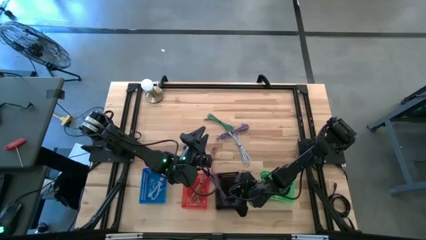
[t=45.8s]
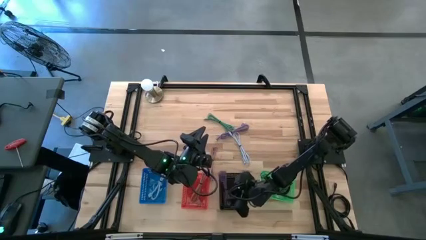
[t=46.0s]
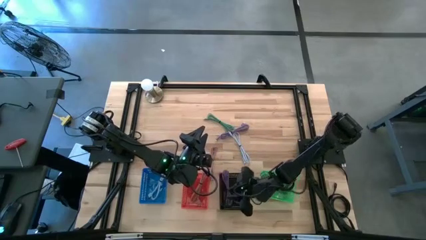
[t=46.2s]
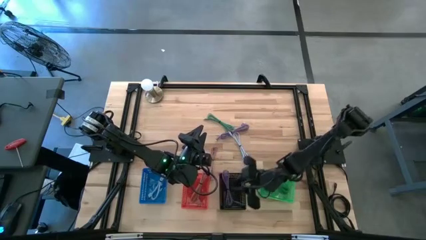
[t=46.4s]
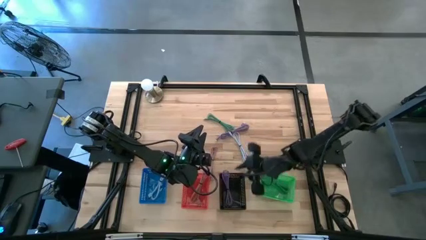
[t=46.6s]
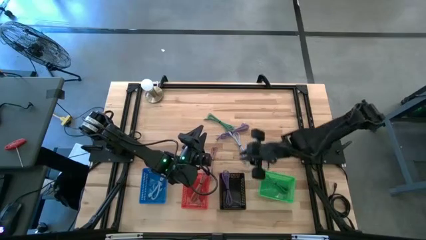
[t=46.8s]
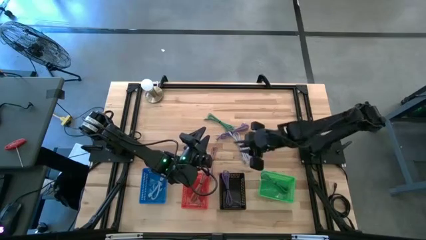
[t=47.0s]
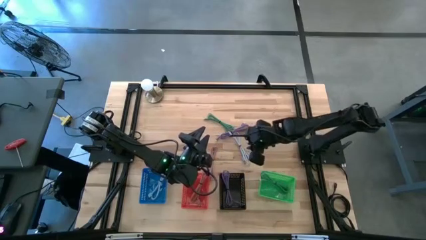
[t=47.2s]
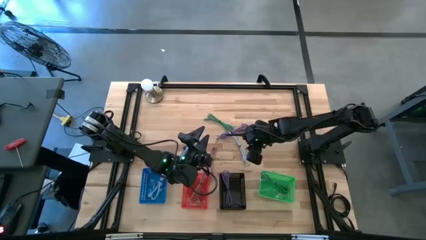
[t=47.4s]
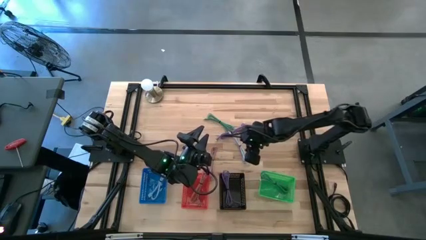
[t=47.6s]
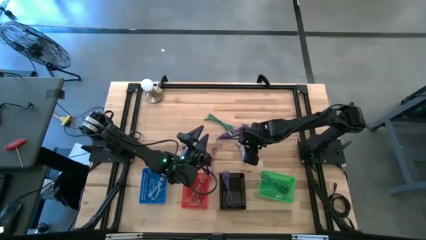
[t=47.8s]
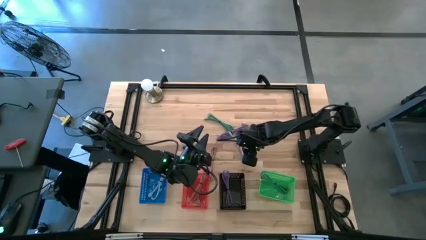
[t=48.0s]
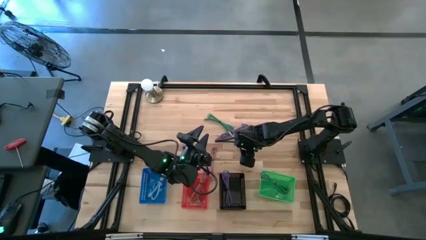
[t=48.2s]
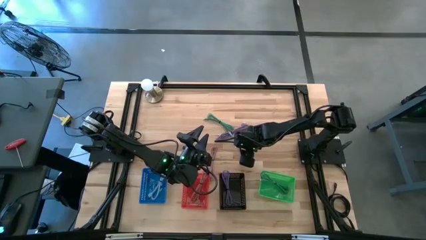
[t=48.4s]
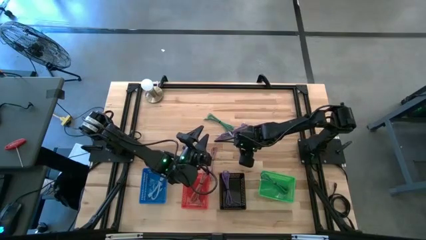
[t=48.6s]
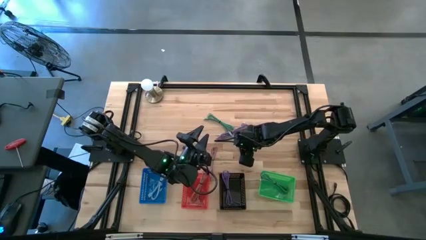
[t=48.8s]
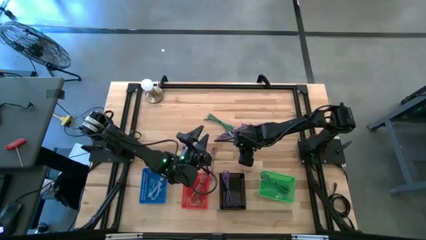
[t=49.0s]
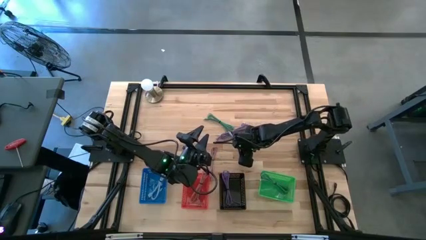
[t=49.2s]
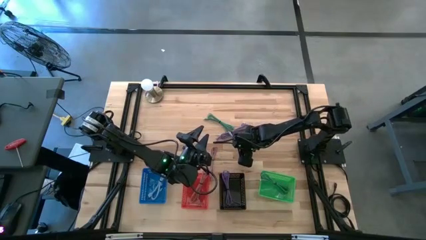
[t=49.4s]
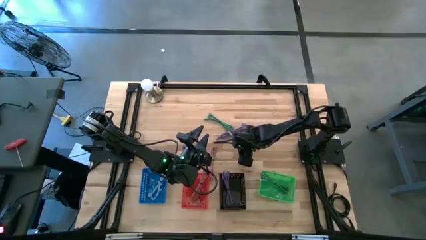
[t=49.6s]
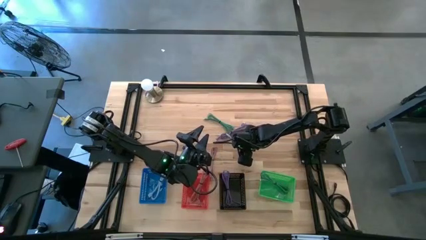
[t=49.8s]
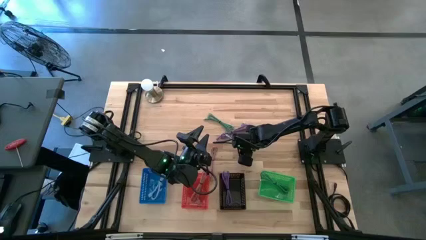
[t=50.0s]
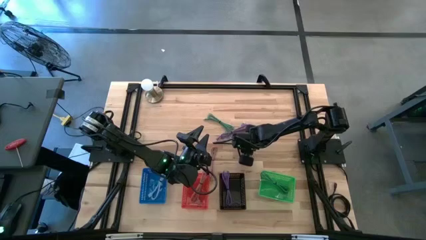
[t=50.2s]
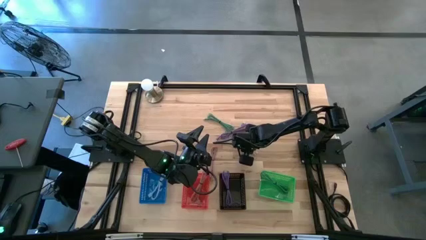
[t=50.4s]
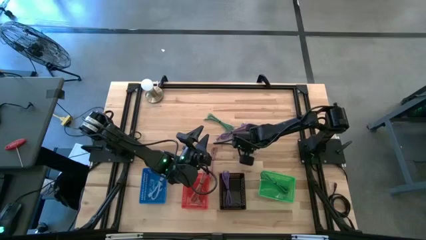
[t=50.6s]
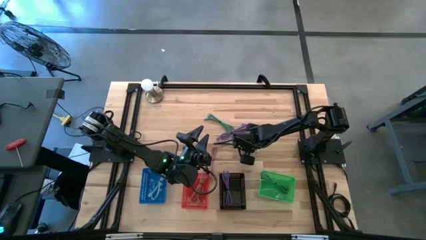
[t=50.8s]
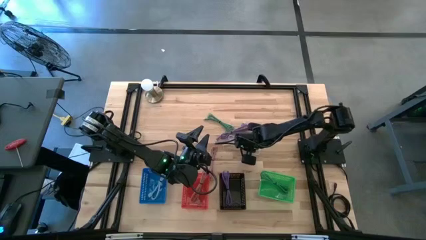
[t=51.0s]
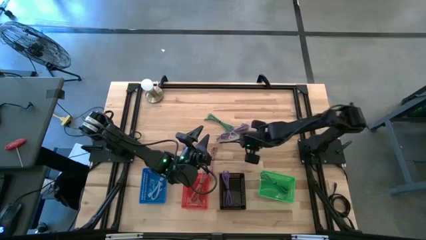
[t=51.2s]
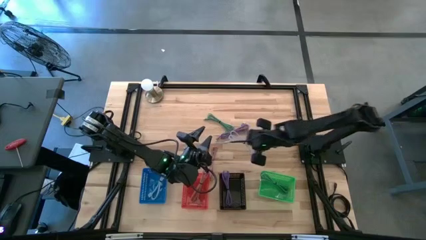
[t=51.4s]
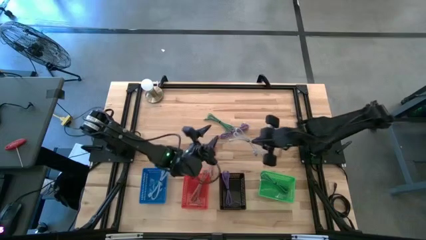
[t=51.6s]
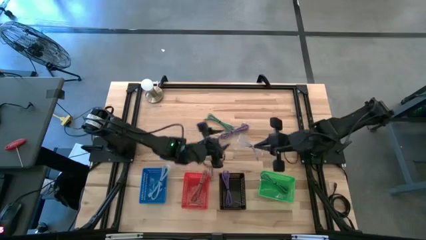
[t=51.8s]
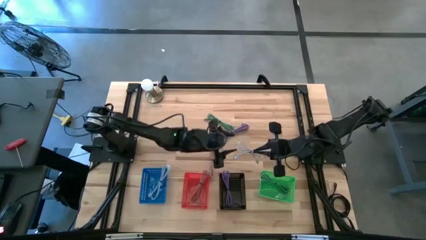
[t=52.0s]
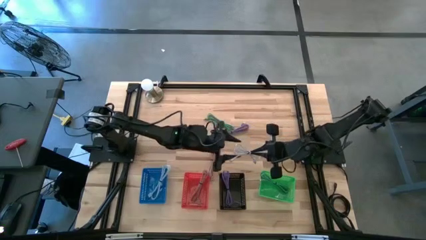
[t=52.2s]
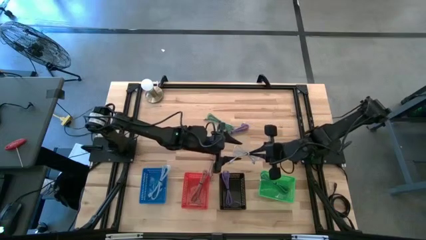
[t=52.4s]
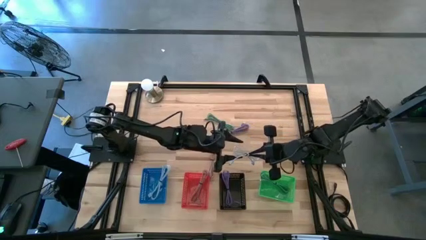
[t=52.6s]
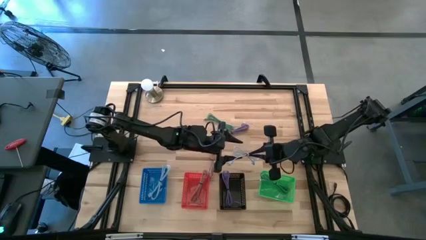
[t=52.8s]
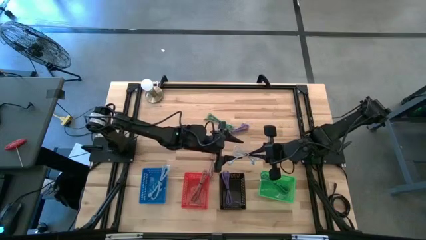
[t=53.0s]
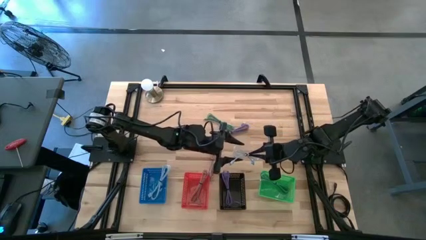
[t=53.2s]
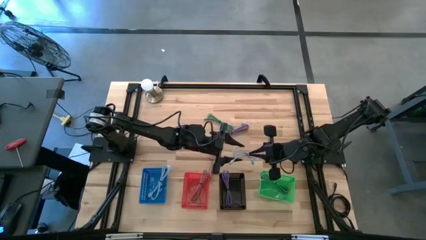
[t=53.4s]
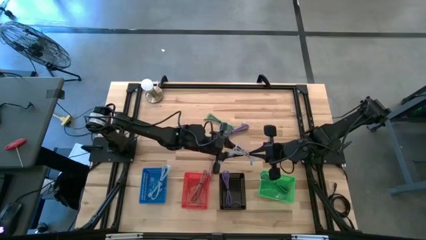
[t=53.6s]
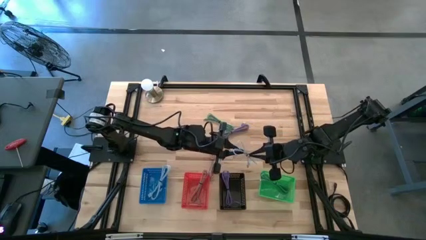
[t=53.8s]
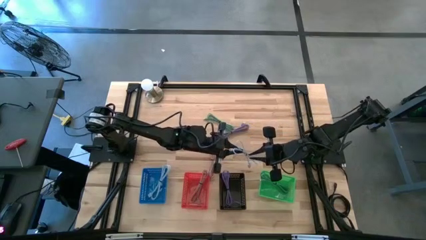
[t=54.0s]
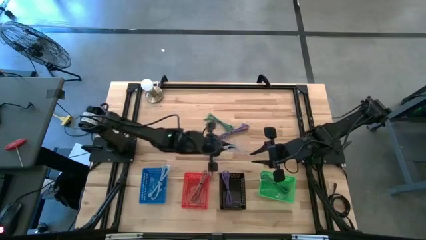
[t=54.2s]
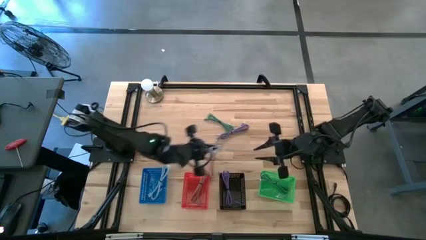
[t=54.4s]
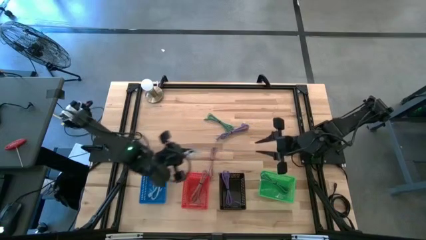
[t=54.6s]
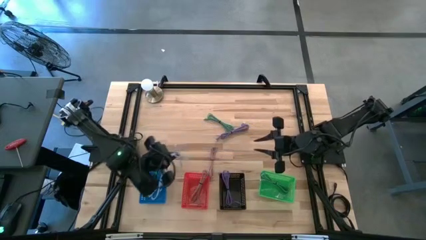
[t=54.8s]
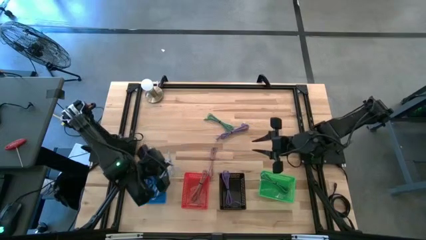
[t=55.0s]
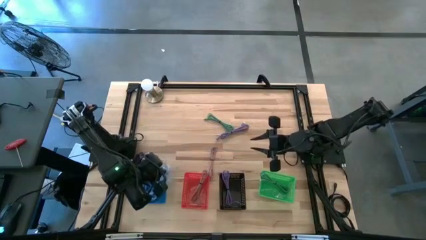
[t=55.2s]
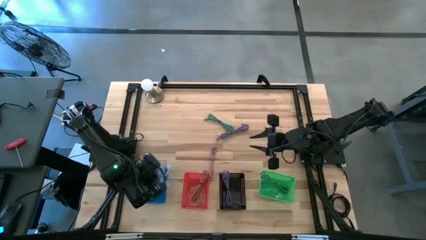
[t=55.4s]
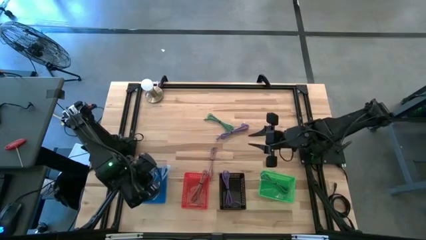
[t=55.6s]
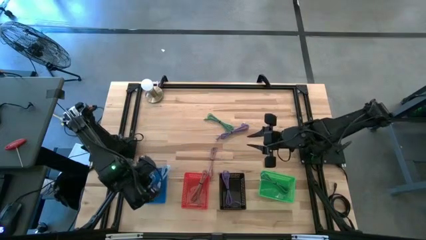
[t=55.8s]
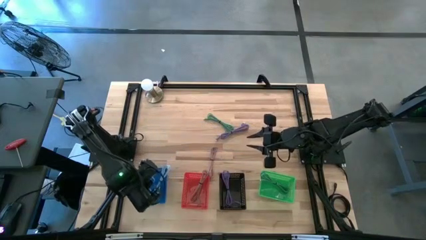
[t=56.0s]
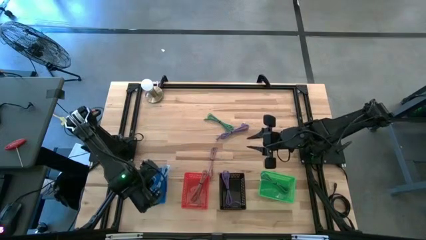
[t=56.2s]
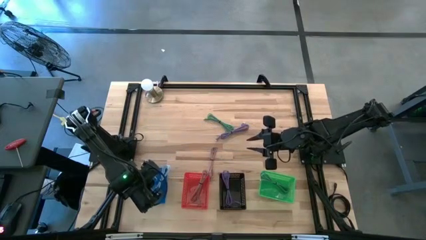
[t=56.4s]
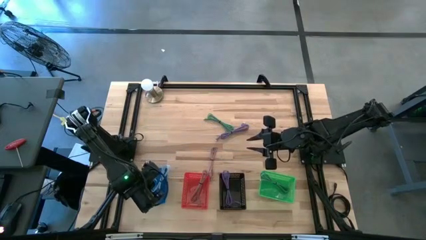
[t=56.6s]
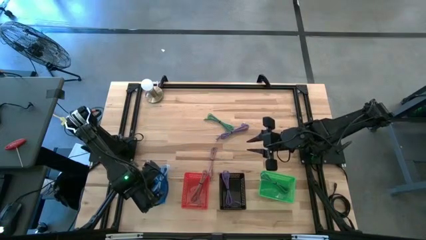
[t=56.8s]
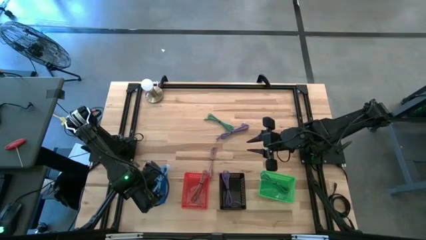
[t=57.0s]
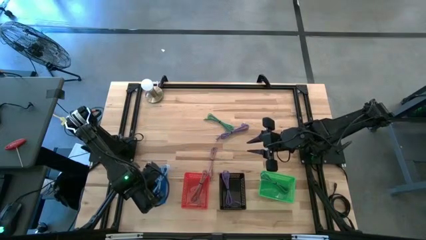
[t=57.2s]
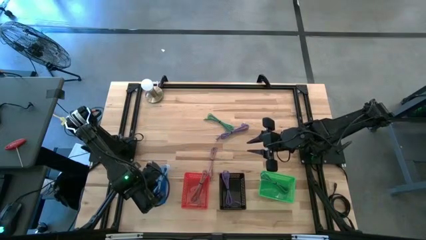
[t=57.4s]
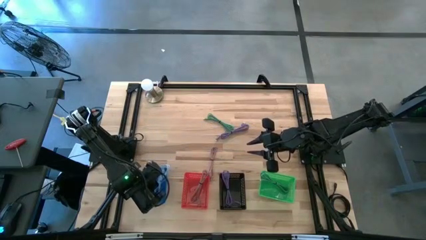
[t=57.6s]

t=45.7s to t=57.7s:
Task: Pick & Place USB Port
Put the light blue charger cable into the blue bin

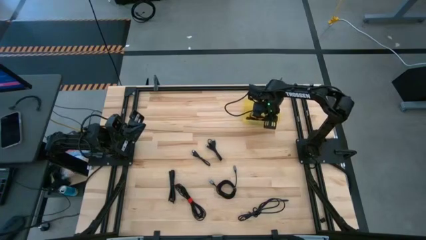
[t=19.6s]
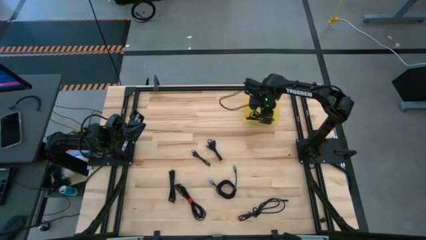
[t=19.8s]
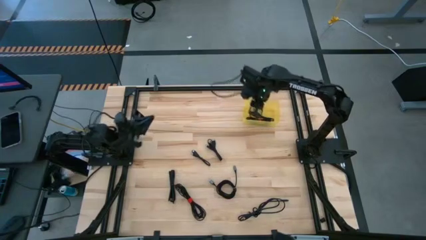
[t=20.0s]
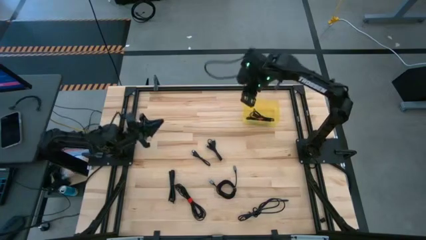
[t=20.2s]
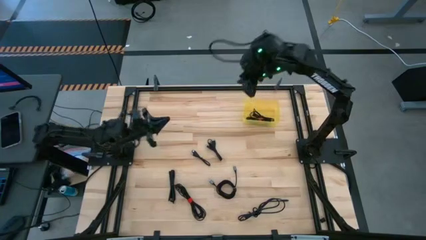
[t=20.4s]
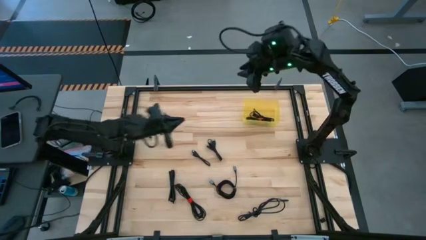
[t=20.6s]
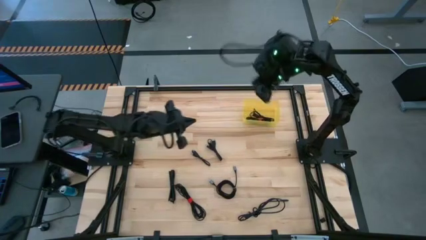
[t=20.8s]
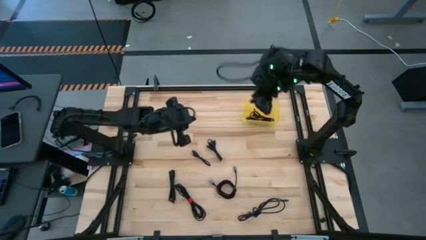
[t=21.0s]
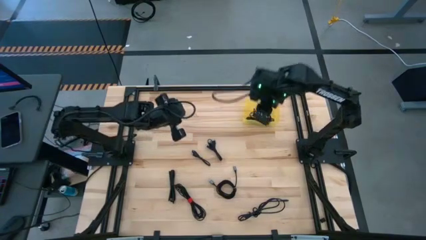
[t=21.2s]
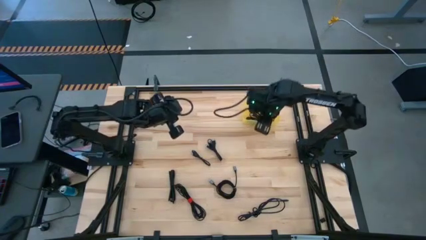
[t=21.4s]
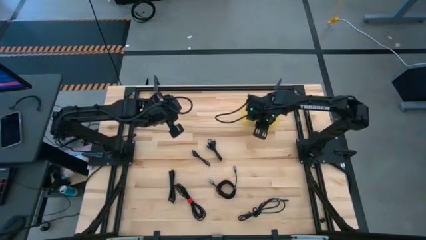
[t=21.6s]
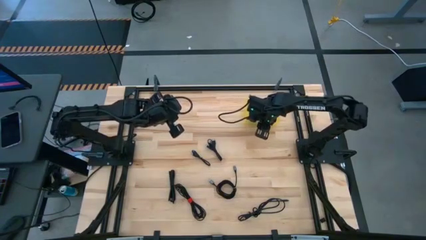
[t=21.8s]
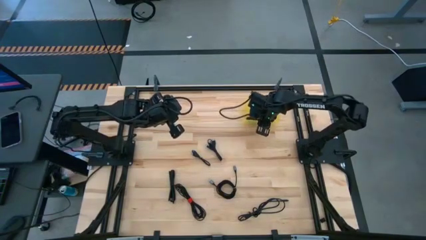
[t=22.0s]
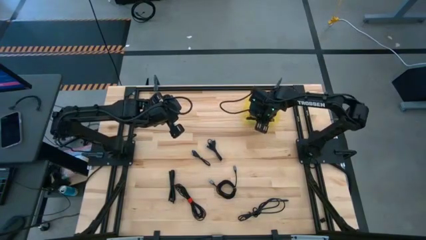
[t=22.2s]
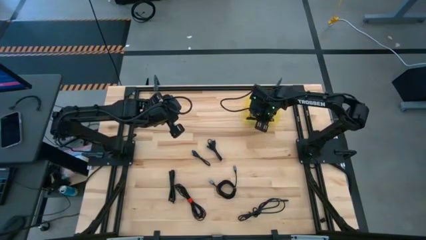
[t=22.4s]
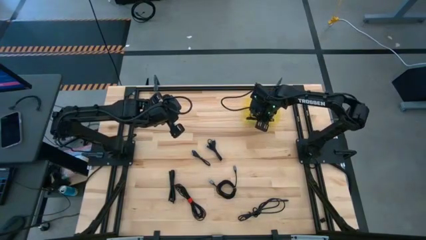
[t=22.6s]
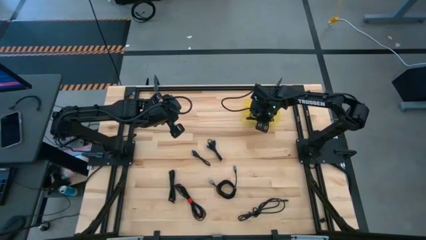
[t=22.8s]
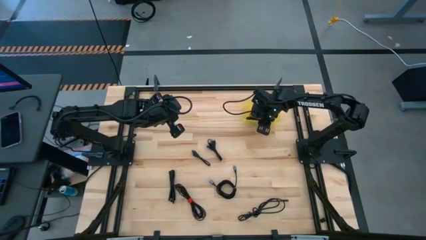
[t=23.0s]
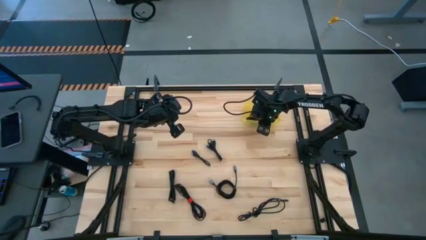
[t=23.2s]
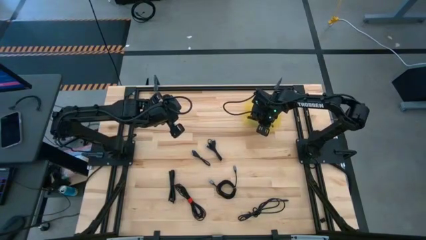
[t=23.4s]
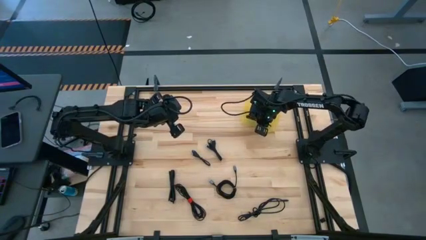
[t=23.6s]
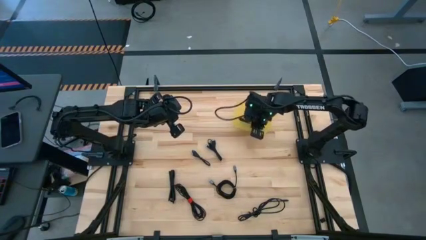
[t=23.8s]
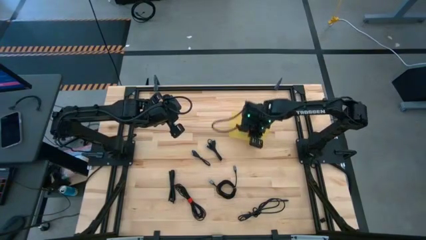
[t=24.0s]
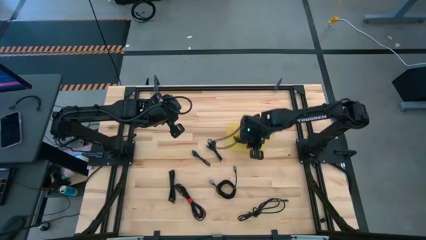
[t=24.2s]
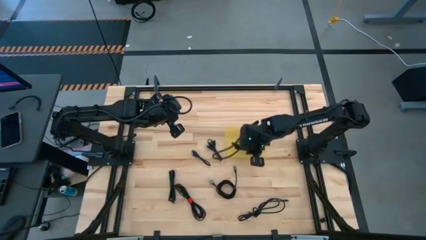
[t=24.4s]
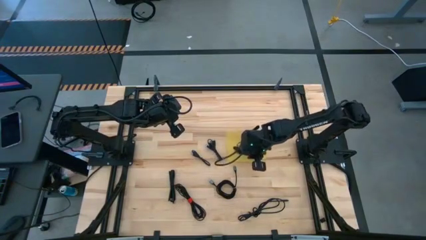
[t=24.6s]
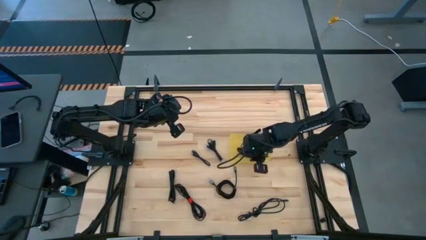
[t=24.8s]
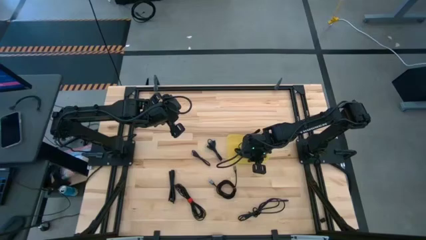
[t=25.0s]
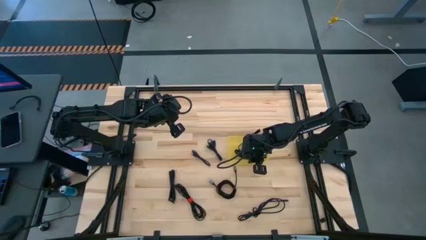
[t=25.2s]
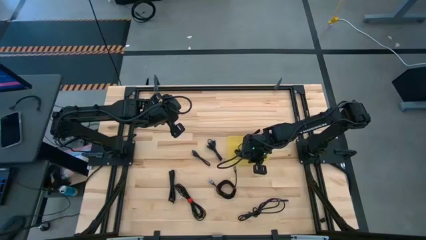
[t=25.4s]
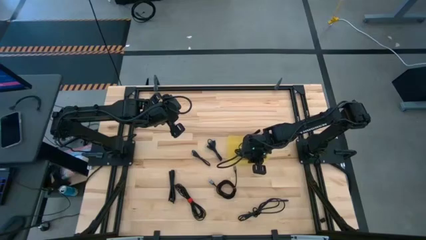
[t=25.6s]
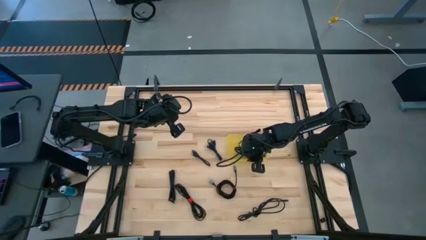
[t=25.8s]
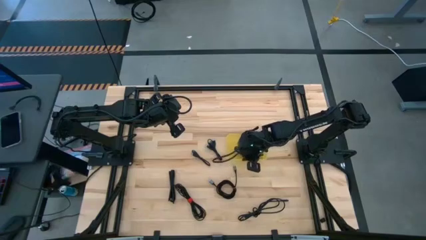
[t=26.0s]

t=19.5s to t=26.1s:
Task: Pick and place USB-C Cables
Move the yellow bin to the center of the table
